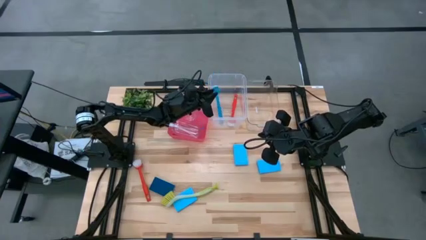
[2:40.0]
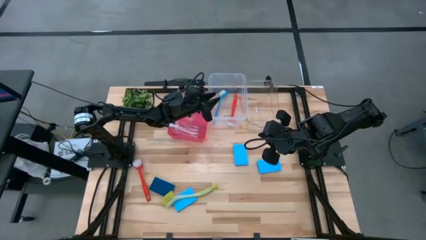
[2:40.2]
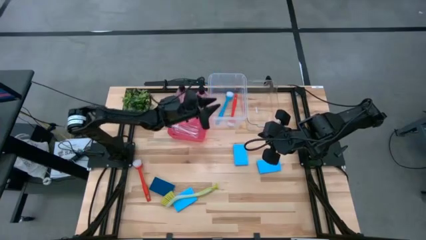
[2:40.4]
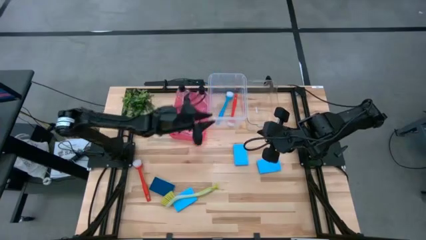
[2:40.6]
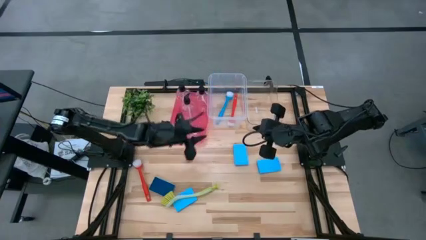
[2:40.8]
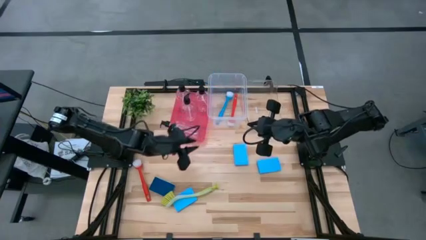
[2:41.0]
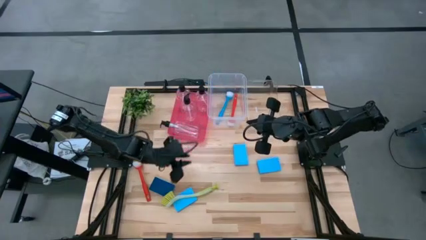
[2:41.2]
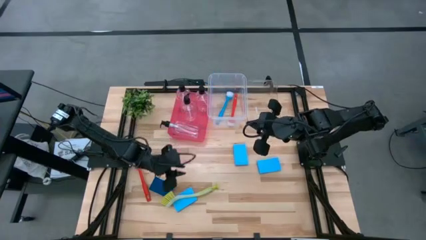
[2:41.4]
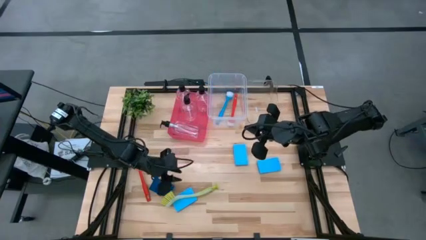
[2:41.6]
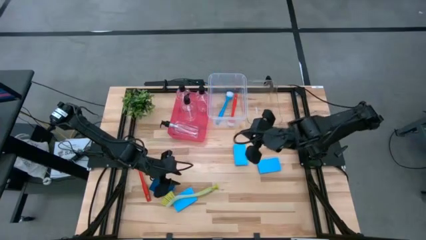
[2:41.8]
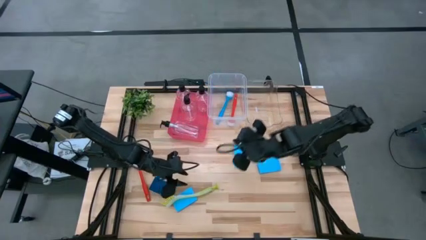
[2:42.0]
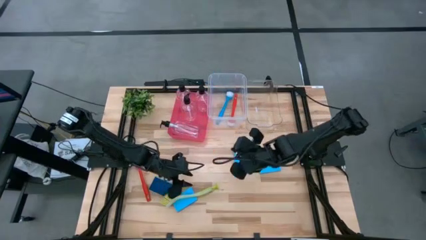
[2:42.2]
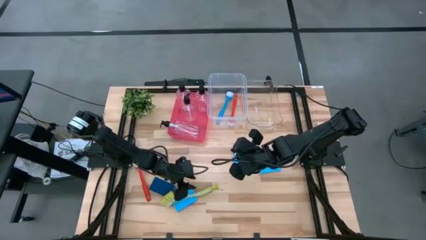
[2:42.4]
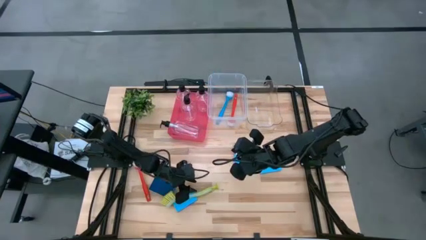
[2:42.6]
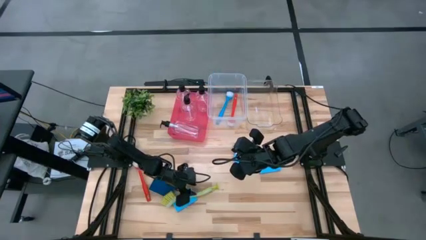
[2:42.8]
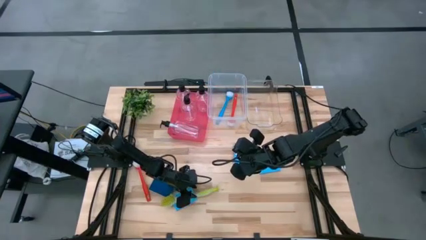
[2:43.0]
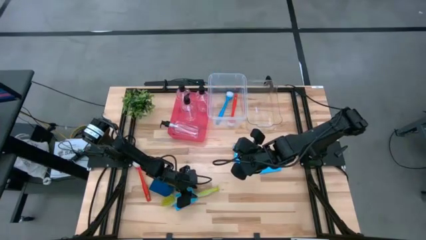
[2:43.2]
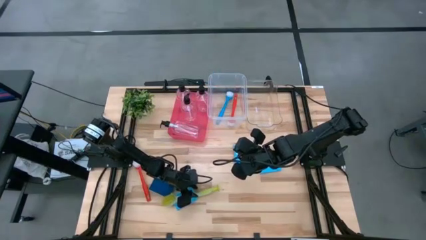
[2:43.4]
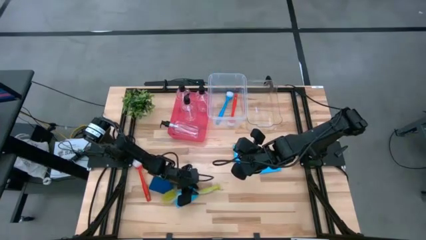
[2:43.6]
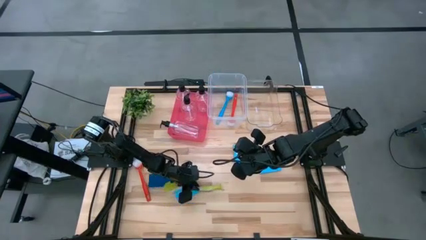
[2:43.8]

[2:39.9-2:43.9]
Task: Pick & Place Kitchen Sink Supplies
Put the green dishwashing brush into the transparent white bin

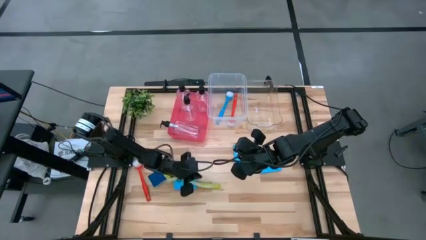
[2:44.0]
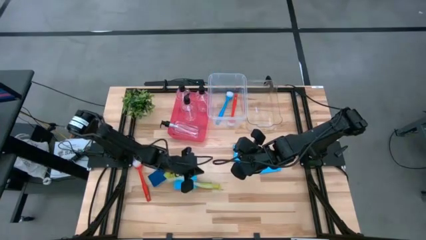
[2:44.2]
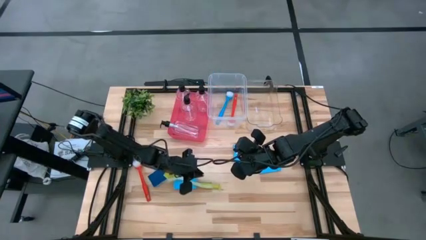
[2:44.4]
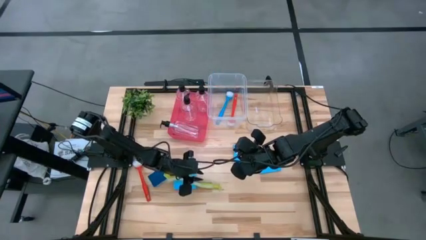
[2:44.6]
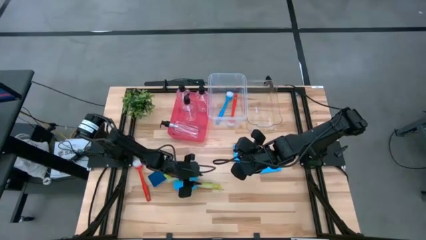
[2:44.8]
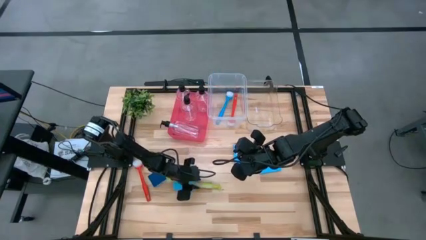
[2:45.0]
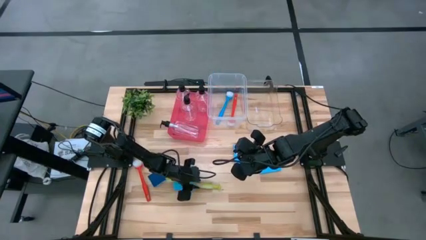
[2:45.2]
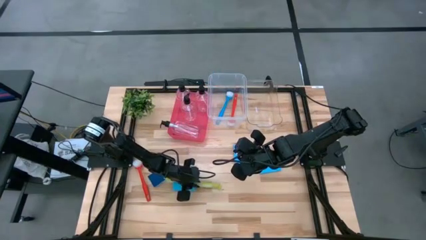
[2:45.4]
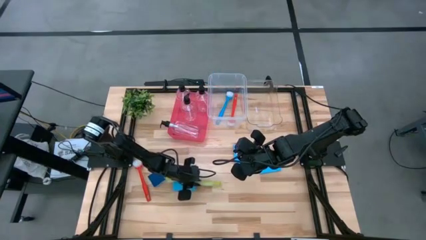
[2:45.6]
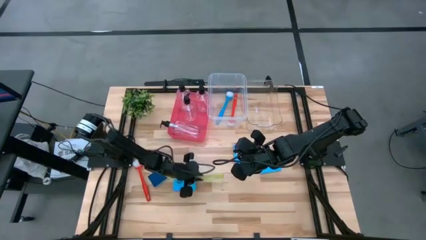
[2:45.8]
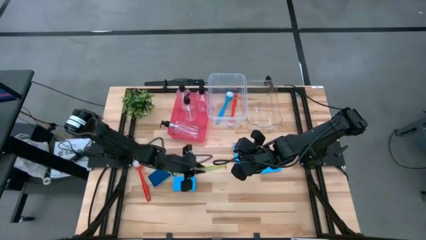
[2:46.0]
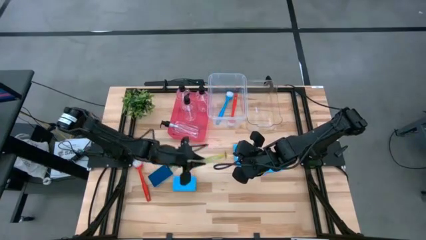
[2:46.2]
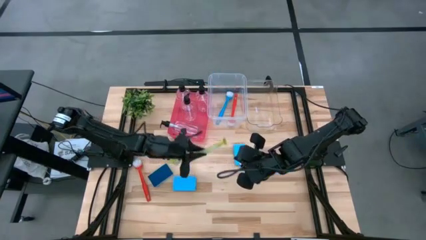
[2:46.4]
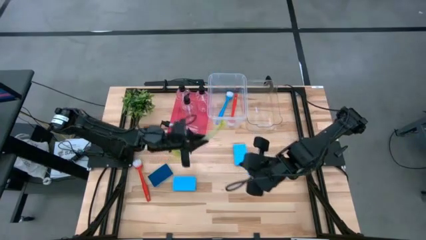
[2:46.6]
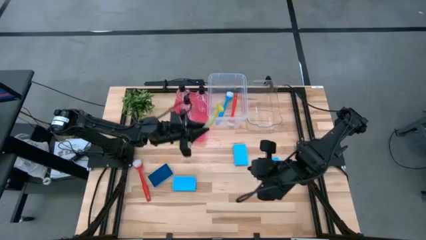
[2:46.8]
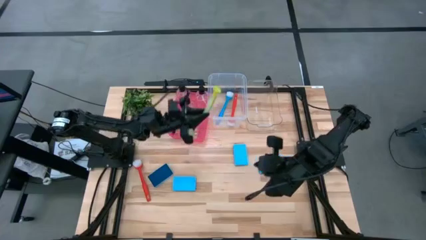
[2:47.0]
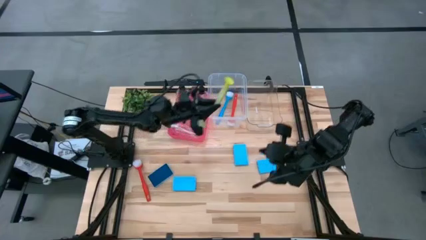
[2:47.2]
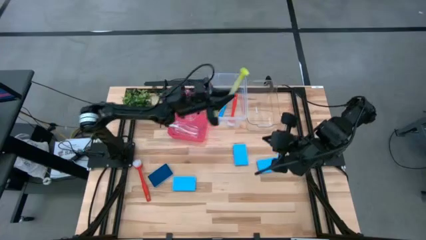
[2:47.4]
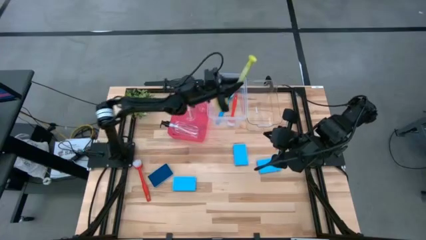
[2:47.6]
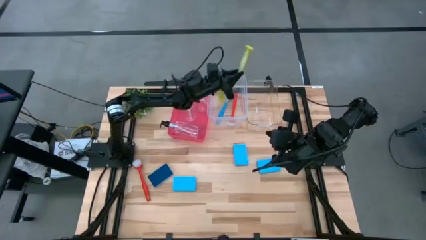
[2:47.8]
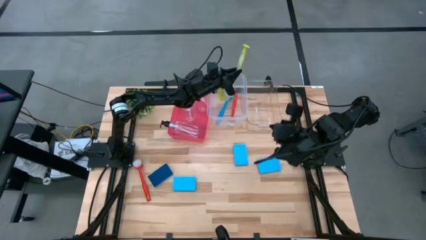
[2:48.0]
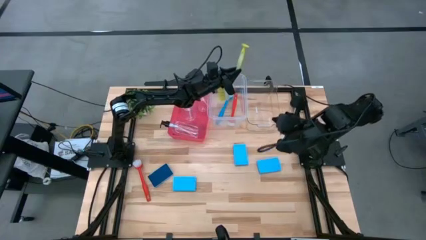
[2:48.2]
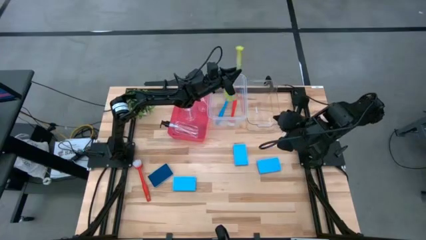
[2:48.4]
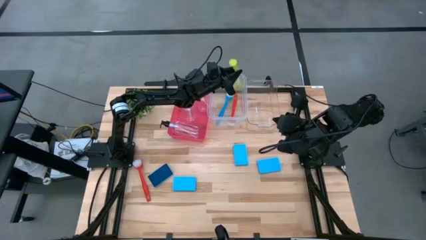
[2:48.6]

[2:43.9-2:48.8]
Put the green dishwashing brush into the transparent white bin

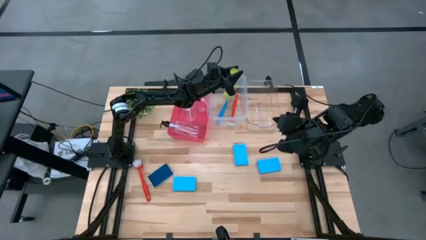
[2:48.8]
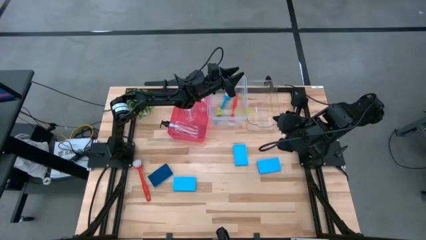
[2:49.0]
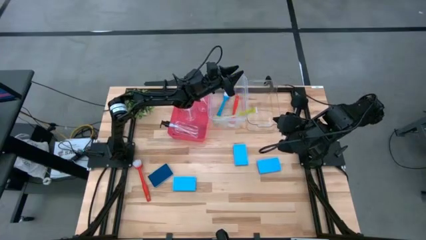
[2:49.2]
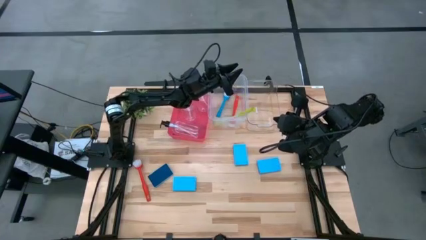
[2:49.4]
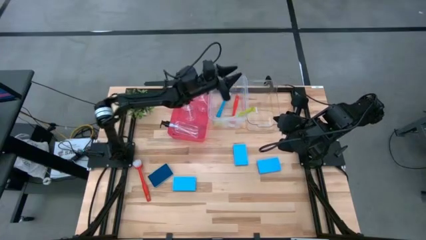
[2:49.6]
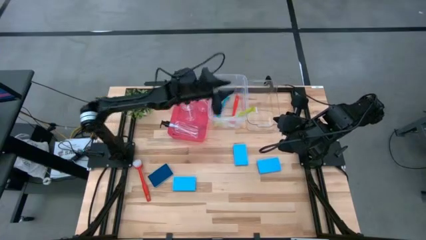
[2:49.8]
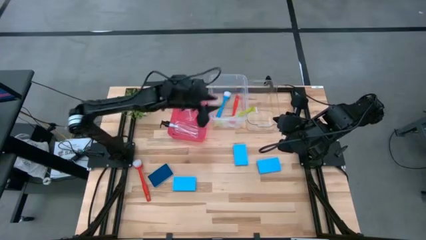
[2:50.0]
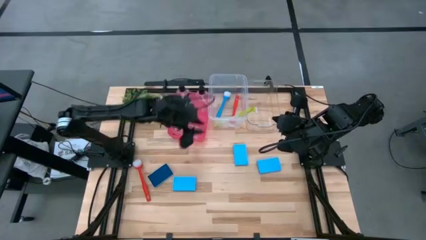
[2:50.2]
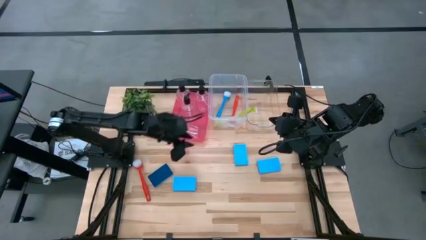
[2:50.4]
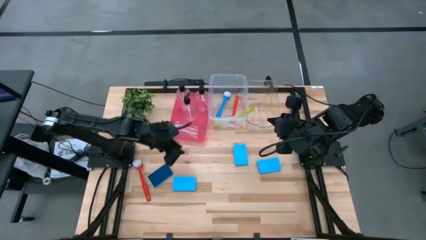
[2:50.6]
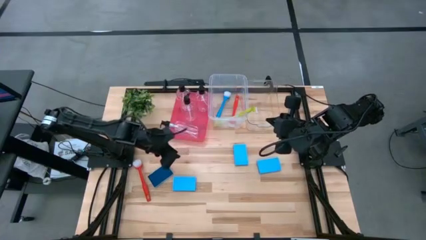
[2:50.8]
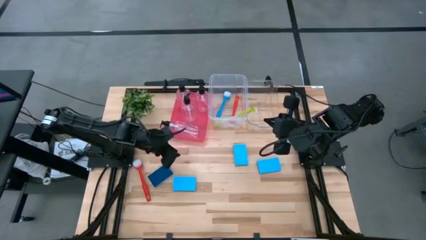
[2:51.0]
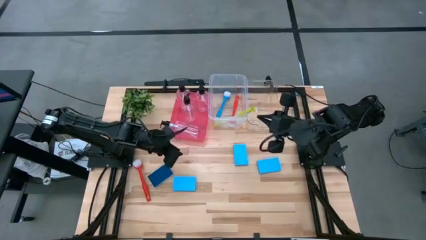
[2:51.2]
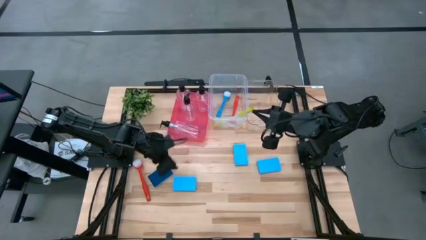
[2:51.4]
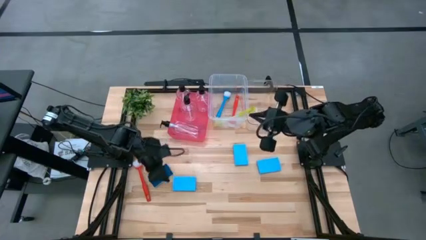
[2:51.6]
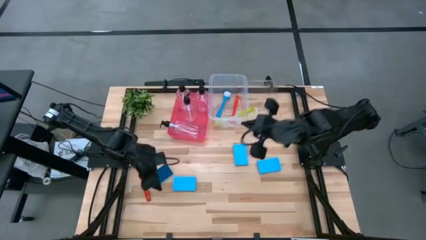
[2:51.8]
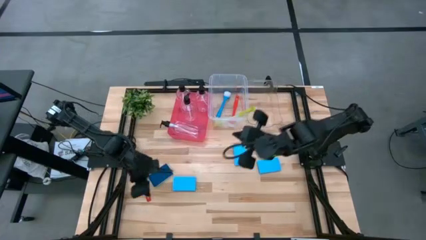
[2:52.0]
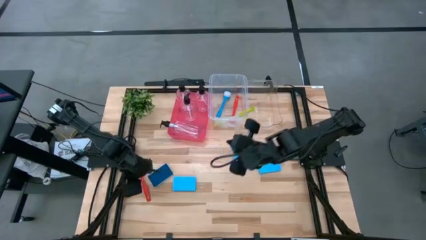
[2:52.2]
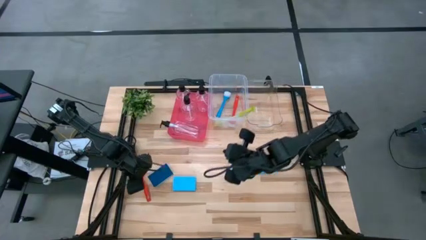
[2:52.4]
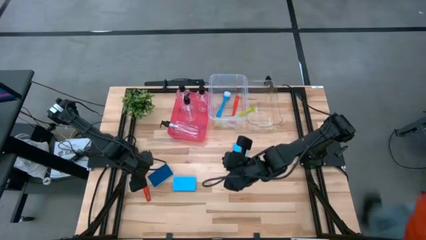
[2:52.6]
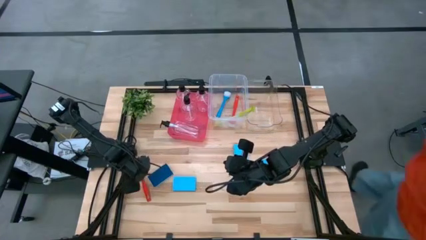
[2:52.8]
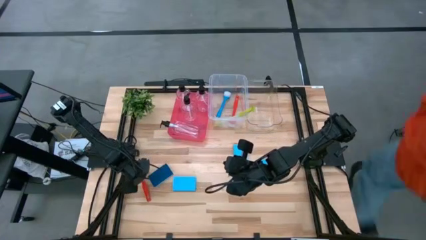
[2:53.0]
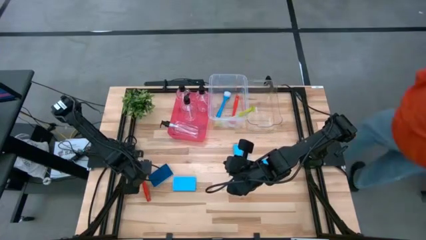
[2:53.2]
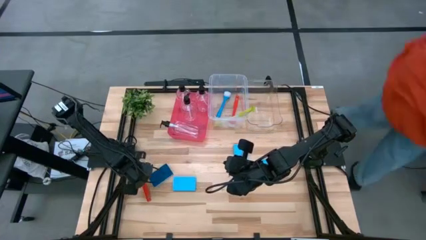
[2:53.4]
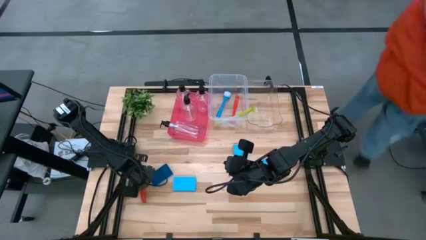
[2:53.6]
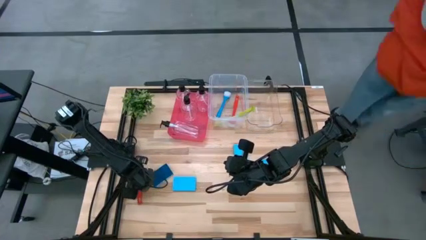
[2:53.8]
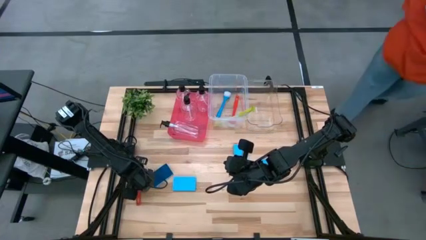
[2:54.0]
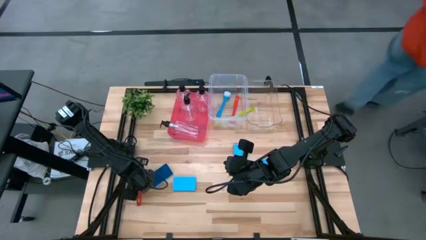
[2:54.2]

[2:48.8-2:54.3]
Put the red dishwashing brush into the transparent white bin

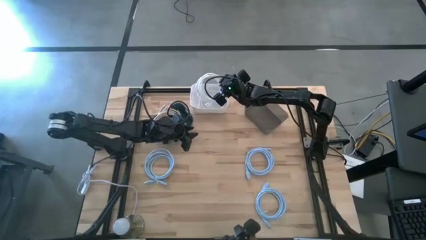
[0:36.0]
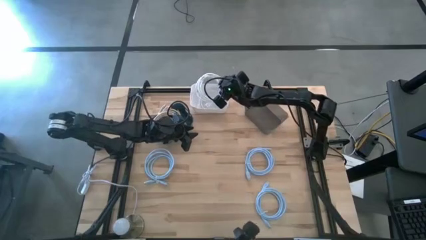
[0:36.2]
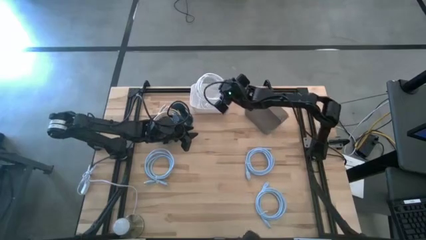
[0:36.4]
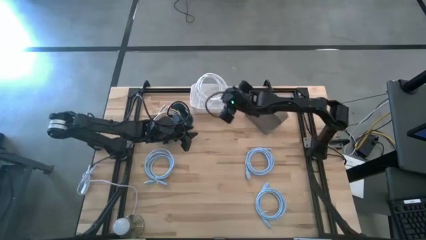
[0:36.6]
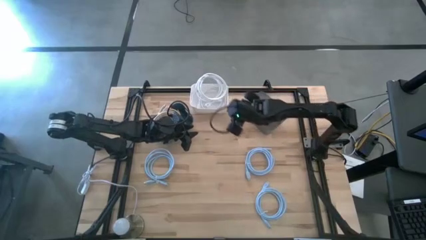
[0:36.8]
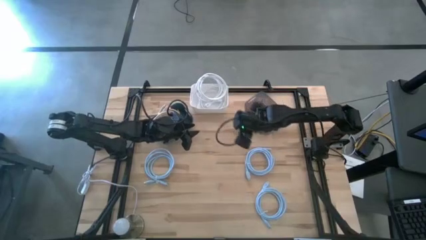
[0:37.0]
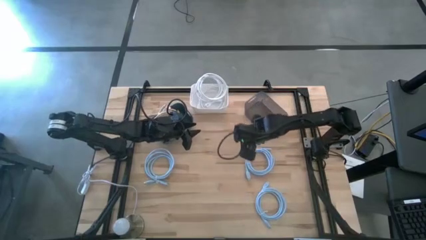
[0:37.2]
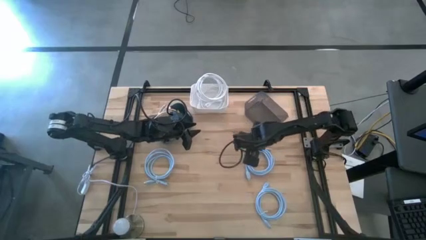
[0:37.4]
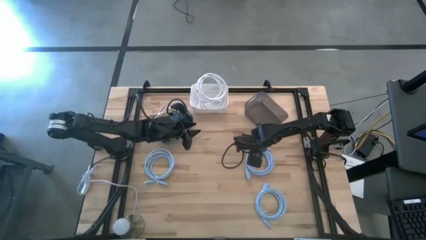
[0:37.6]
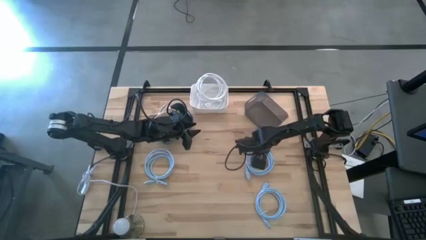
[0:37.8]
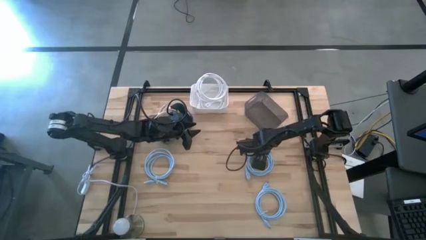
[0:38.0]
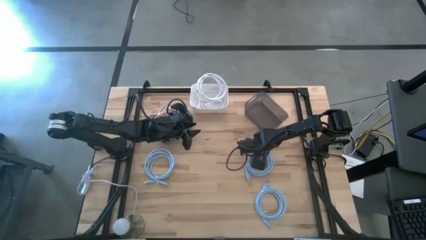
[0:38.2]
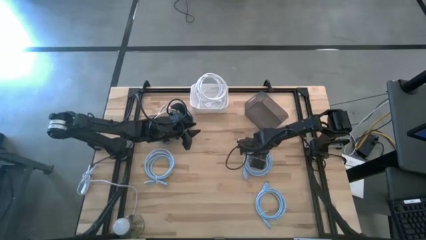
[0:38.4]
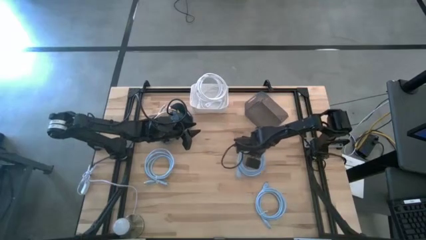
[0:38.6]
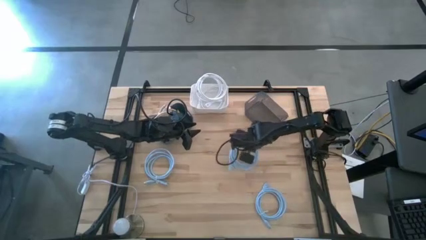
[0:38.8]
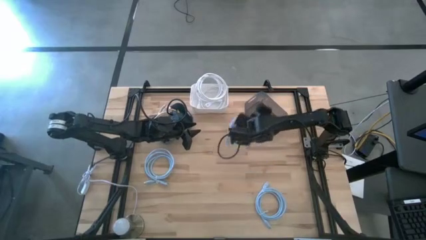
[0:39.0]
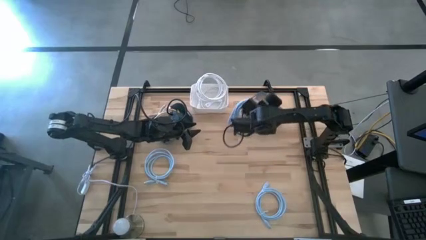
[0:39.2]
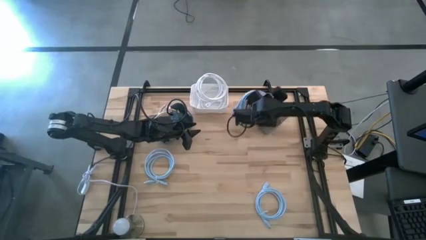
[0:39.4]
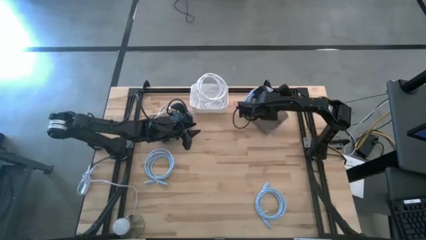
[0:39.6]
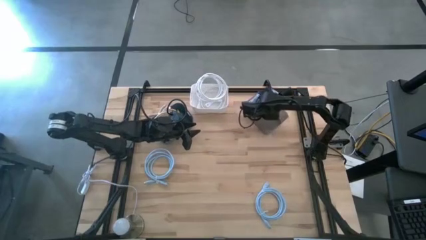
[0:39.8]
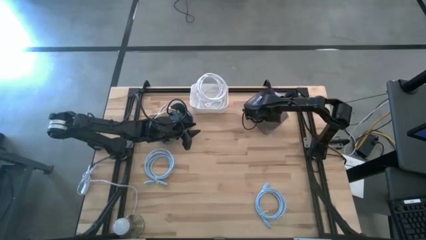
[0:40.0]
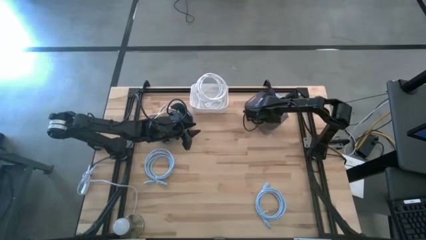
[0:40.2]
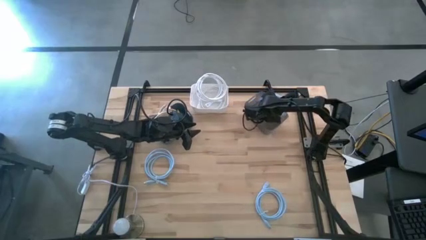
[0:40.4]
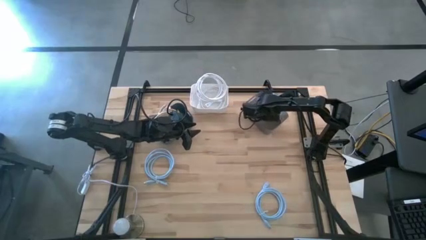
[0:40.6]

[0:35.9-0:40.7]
Task: Sort HDMI cables
Put the top right light blue HDMI cable into the black bin
